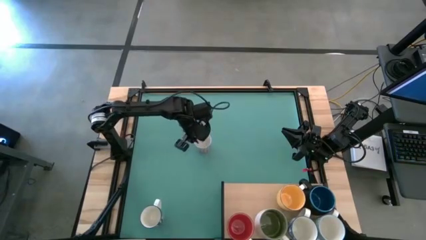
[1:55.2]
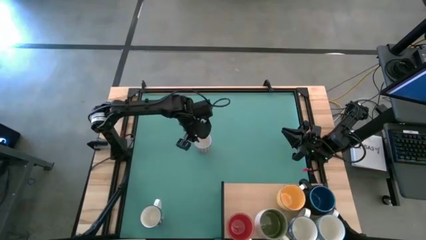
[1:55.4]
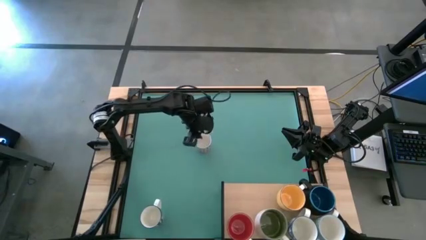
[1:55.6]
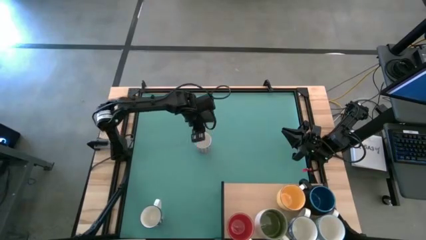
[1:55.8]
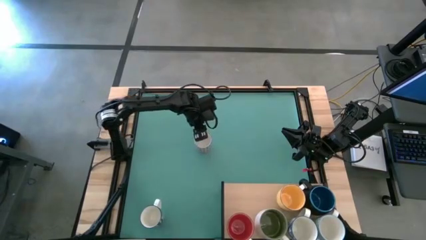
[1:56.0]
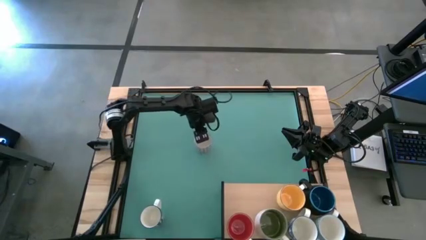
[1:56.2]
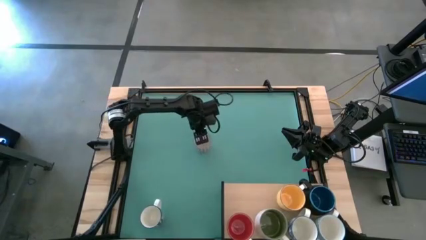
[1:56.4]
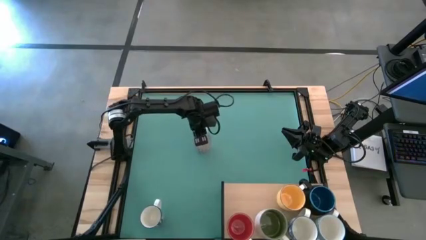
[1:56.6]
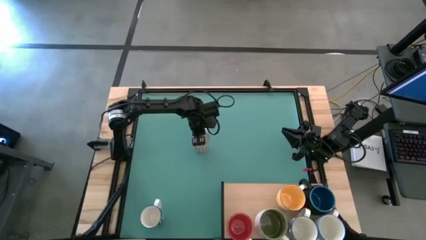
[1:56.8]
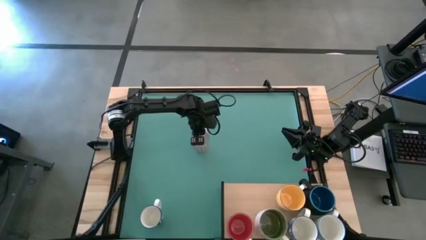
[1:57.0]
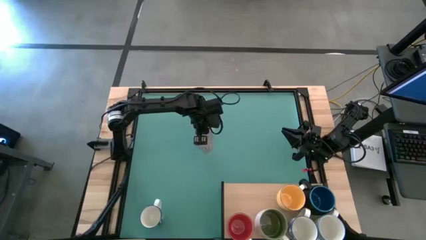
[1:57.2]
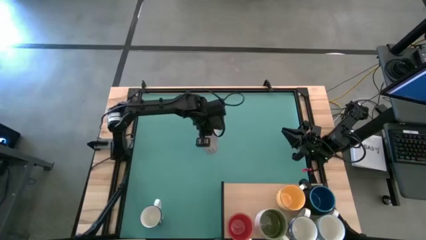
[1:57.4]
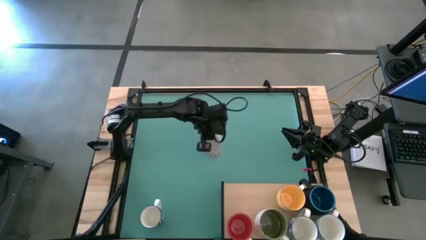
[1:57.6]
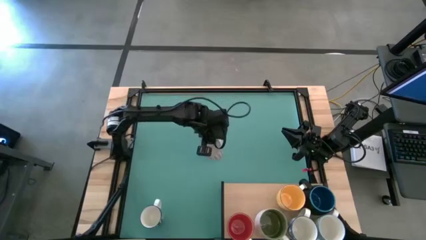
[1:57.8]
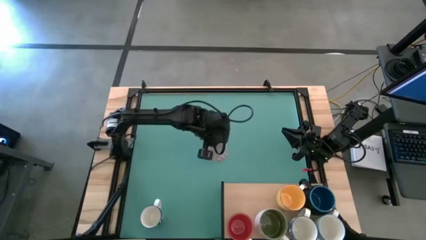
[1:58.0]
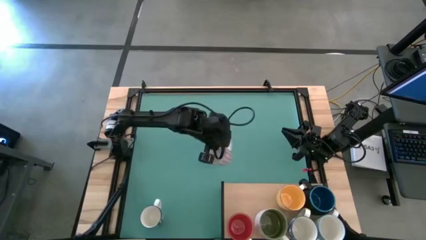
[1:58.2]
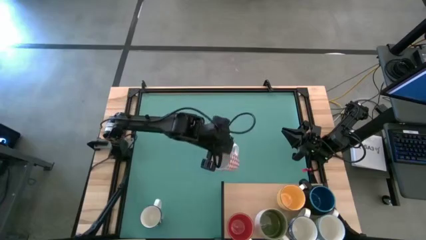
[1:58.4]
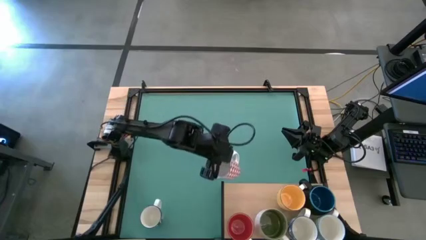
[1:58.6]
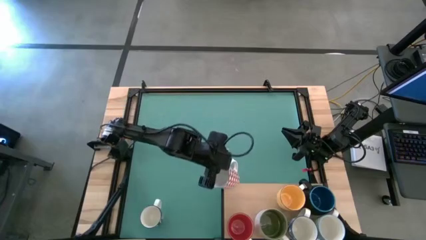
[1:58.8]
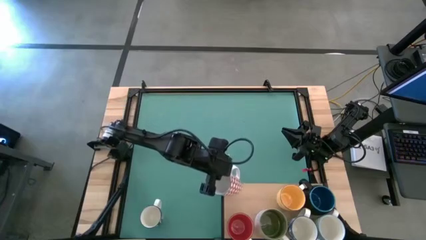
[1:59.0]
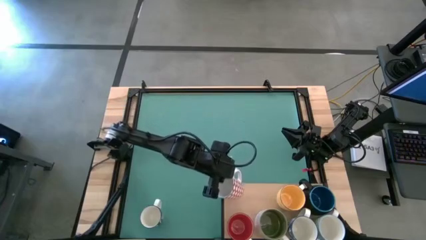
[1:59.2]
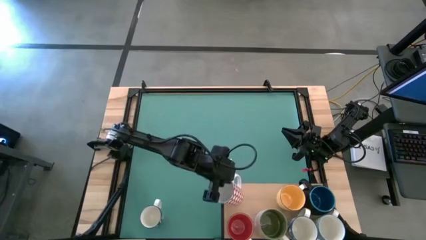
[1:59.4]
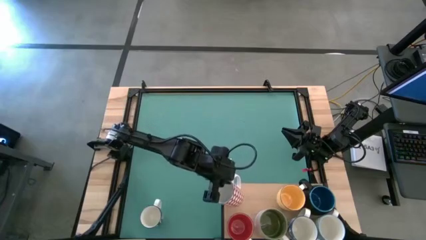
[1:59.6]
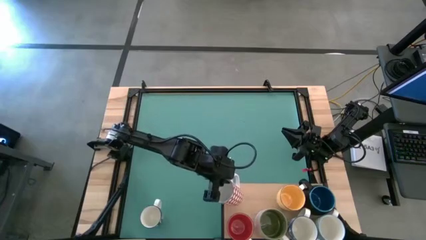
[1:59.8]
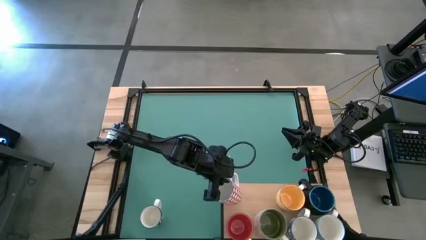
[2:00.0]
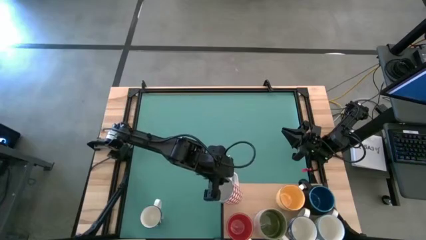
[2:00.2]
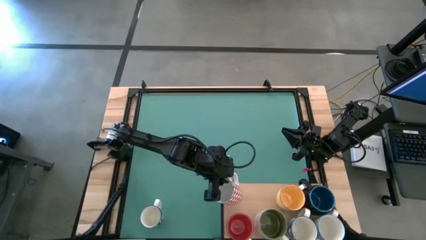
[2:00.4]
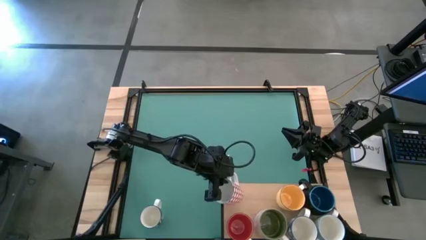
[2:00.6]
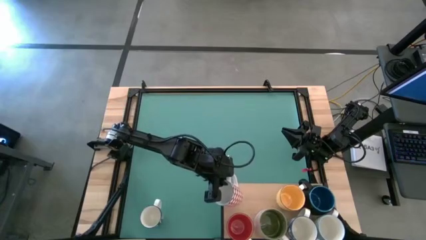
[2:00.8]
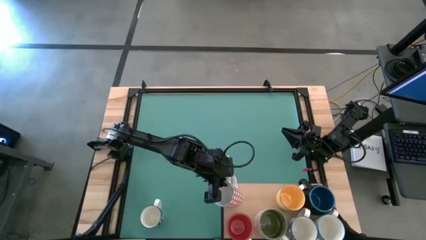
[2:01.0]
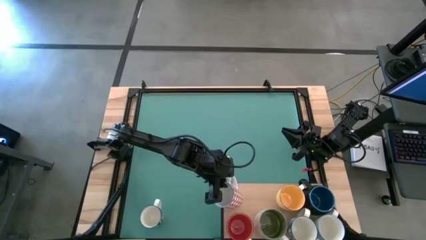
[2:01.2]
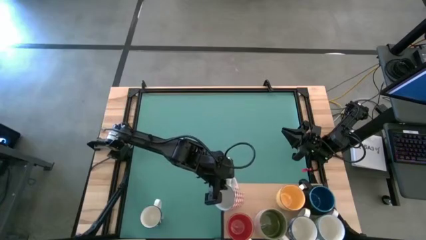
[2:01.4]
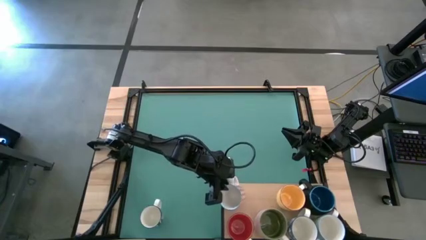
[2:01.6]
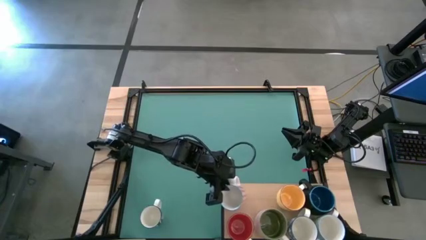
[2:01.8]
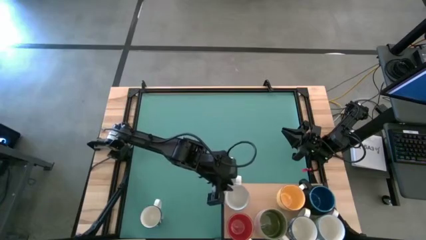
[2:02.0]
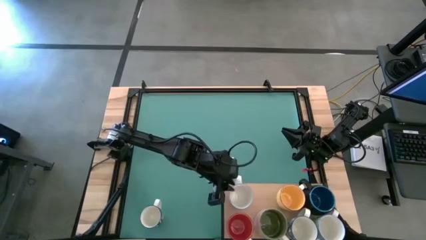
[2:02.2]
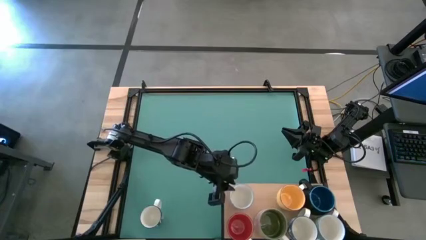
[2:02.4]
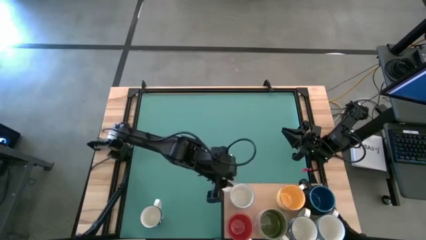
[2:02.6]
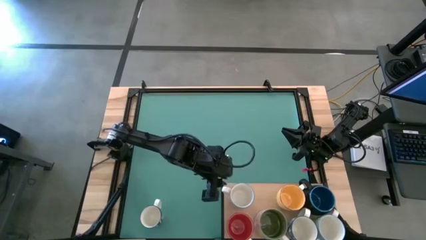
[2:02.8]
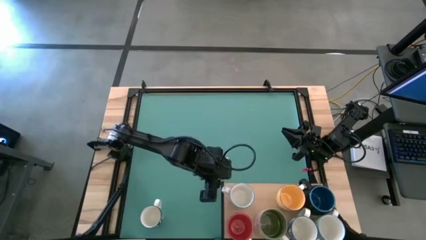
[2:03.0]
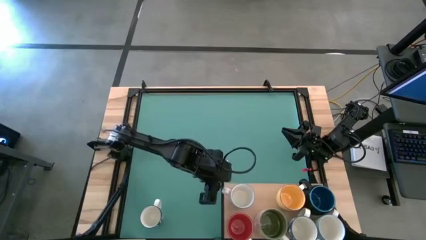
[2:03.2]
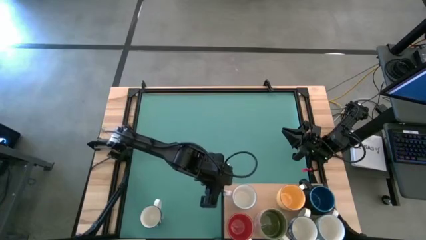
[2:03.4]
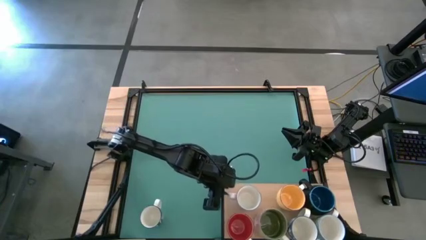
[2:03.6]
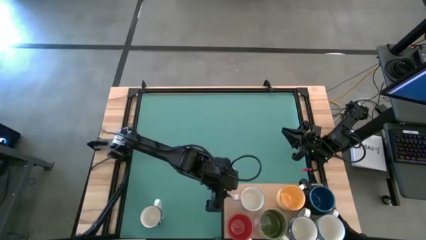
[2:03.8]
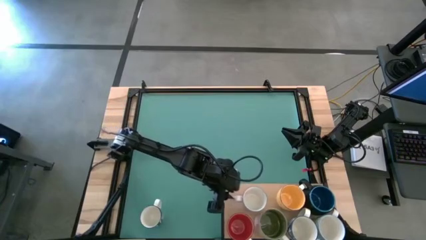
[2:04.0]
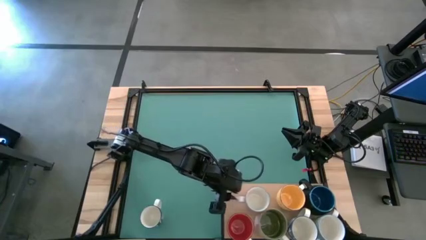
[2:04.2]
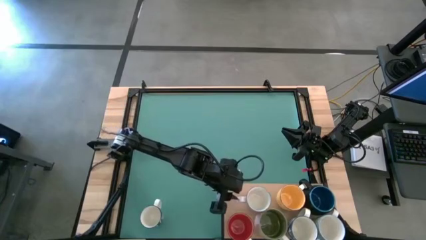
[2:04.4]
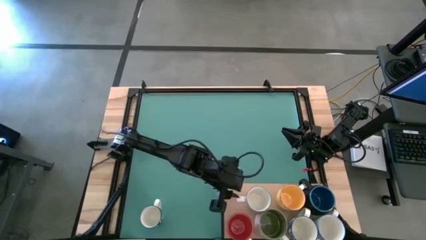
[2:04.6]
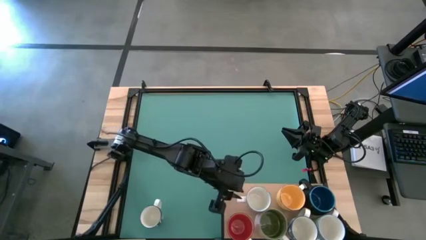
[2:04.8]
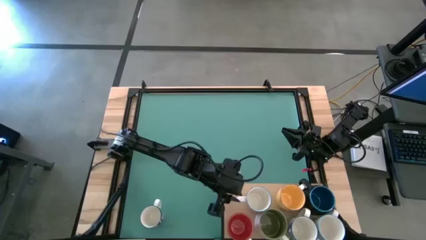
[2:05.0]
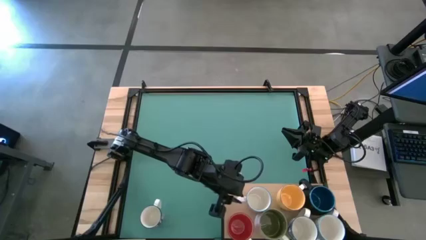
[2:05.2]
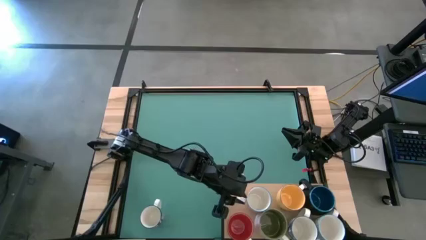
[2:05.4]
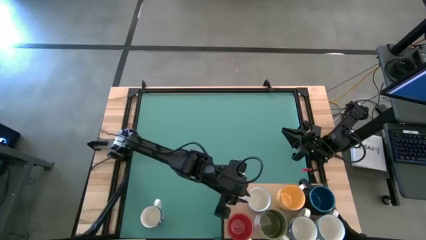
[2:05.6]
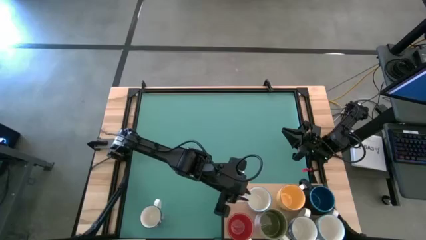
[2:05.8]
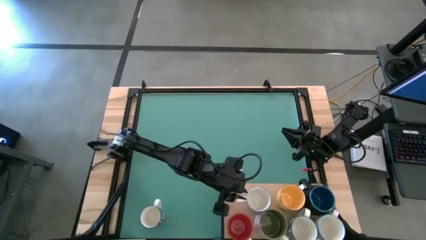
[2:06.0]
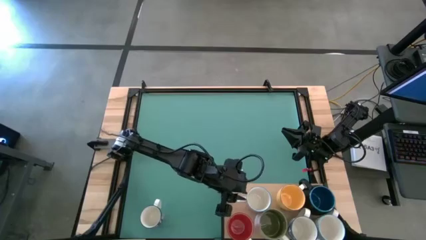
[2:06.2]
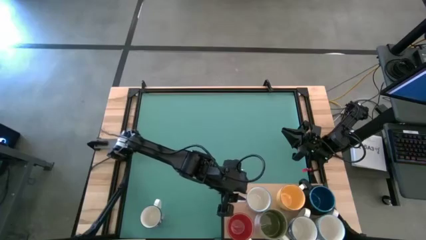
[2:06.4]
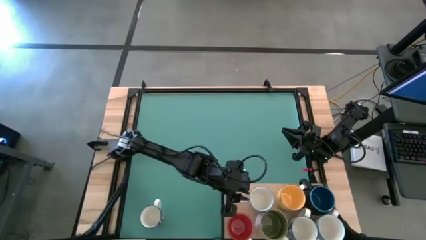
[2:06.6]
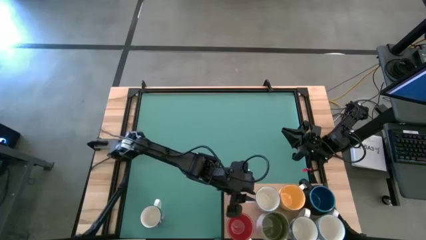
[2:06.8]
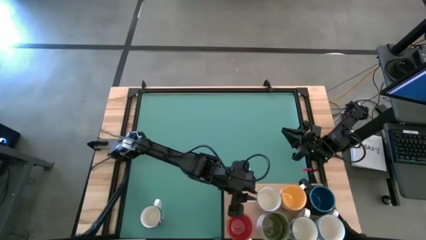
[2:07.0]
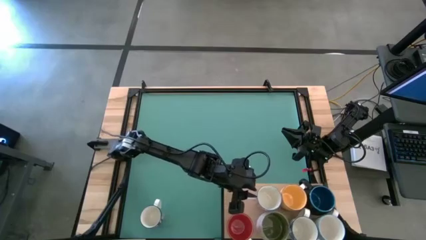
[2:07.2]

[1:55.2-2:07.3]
Task: Place coffee mugs
Put the red patterned mug on the shelf

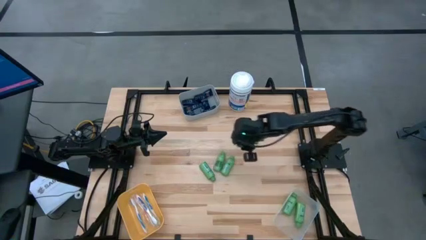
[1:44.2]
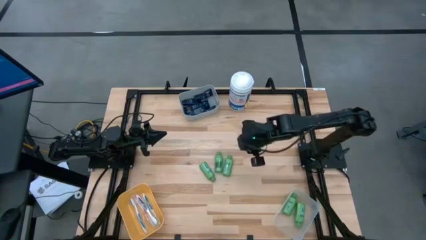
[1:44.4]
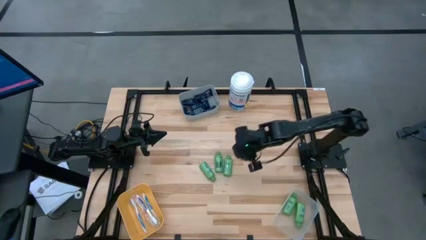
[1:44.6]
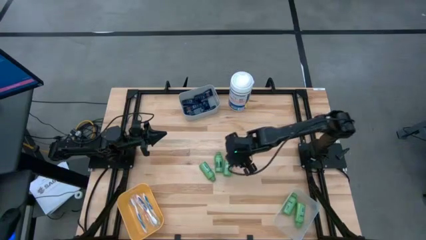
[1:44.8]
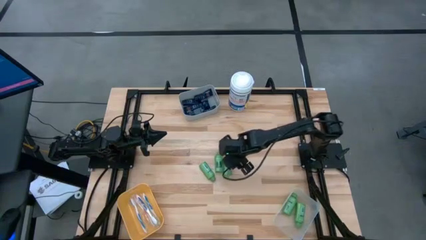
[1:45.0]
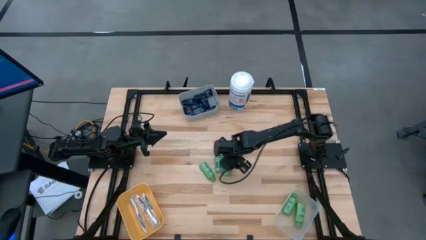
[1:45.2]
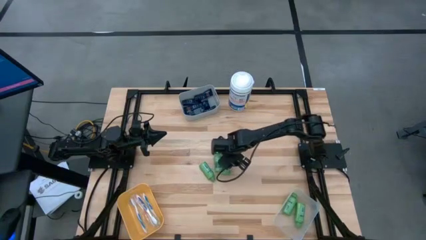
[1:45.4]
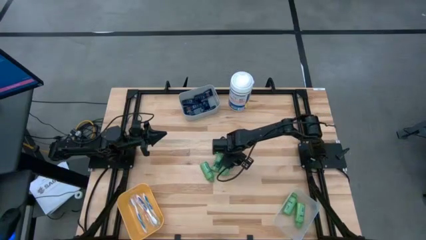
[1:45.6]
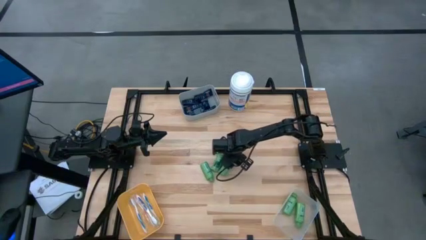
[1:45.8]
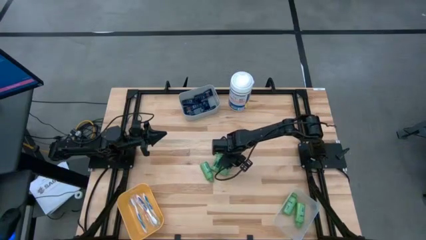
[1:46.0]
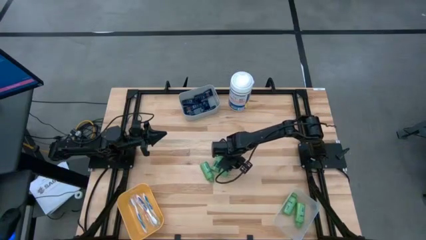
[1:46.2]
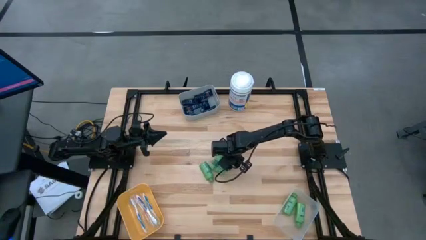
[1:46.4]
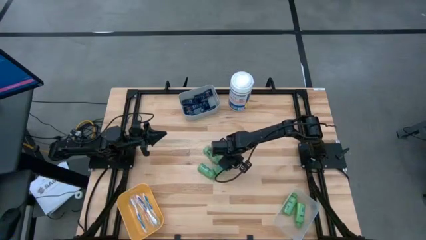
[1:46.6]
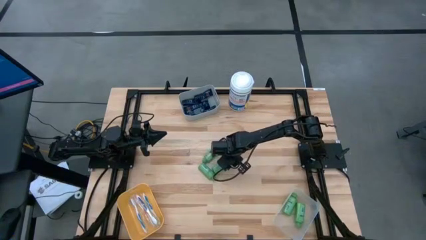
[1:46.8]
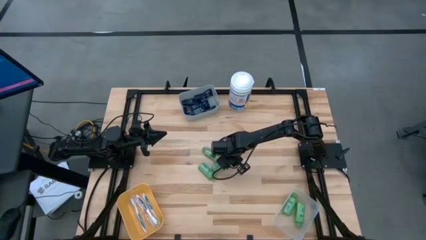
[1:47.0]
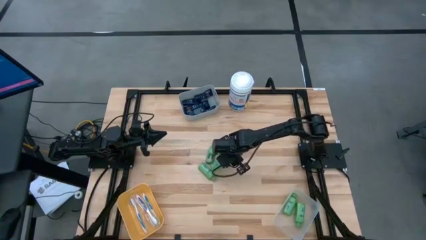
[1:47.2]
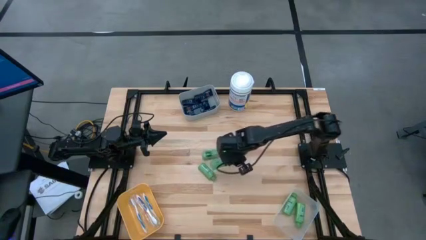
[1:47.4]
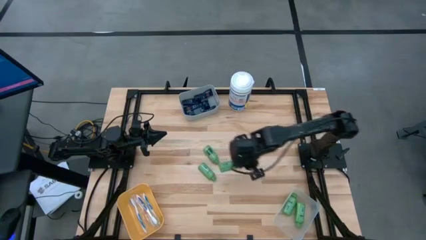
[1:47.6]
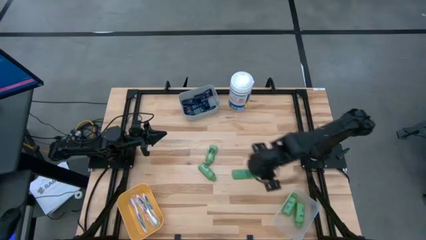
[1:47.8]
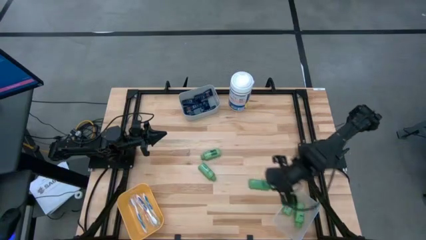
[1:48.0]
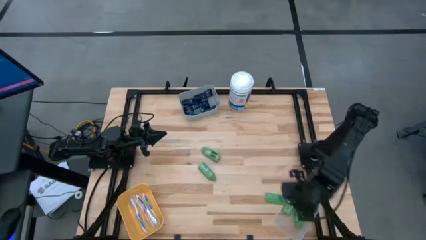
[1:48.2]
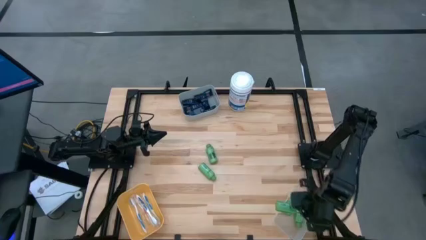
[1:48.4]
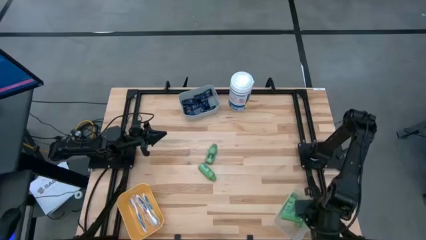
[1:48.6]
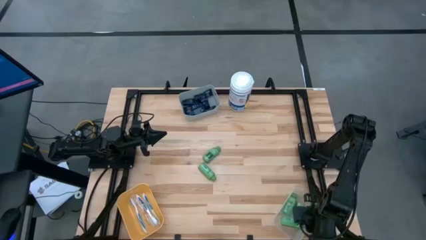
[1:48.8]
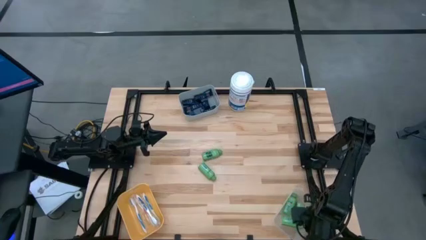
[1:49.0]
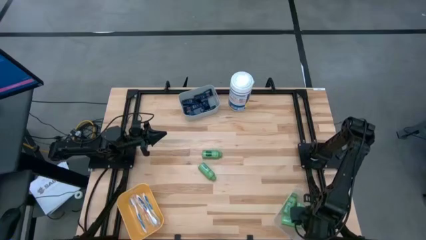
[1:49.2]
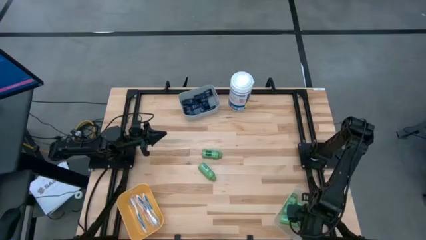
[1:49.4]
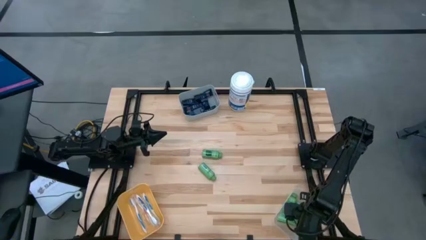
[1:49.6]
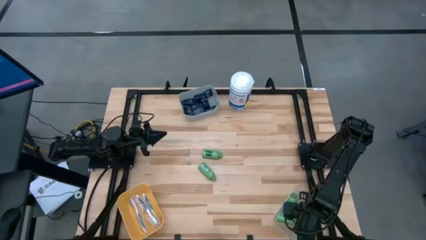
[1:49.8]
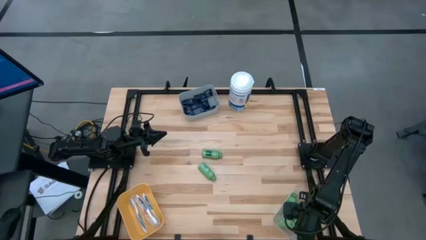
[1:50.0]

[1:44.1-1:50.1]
Task: Pick & Place Travel size toiletries
Put the green shampoo into the transparent bin
